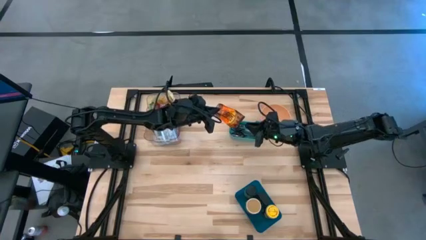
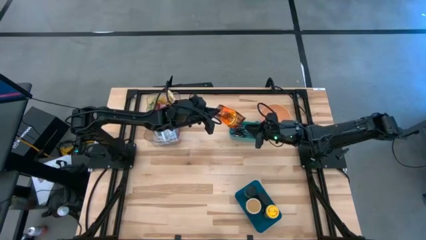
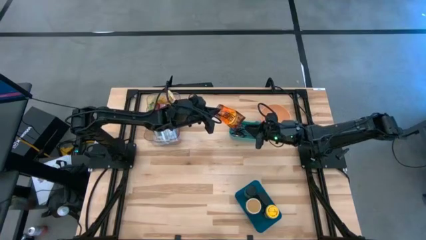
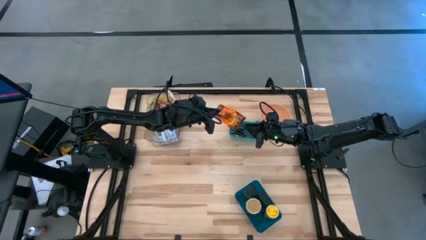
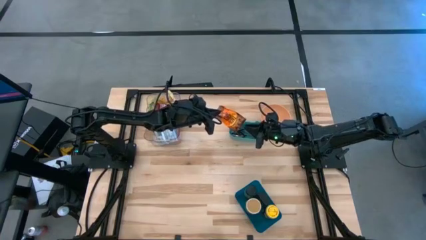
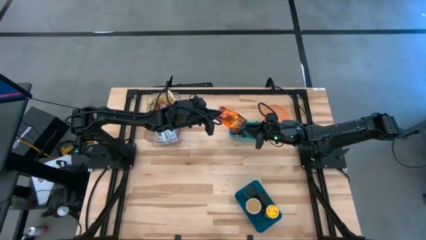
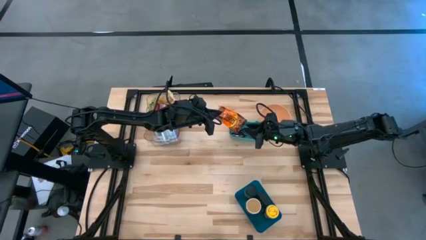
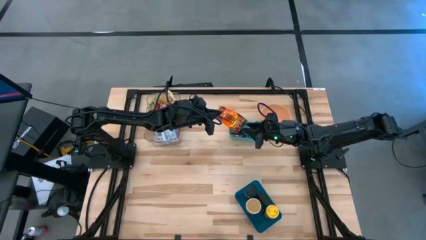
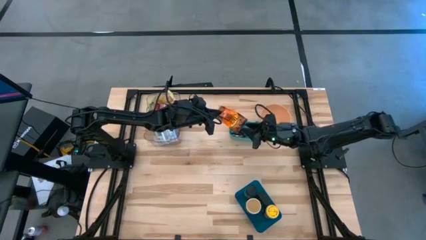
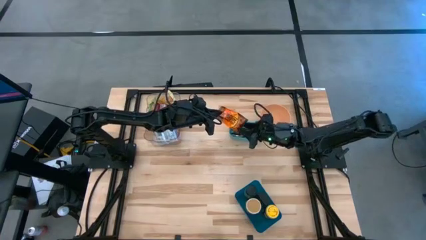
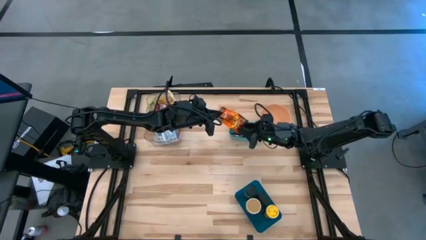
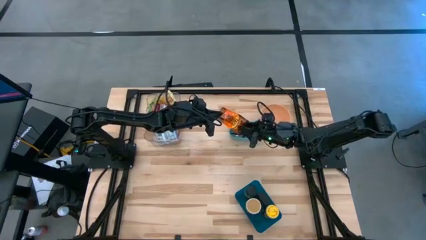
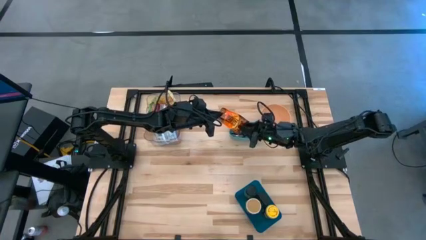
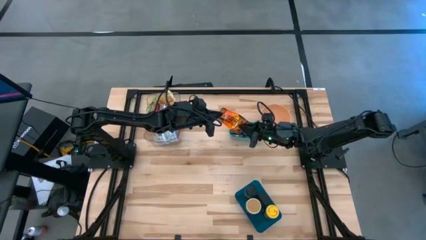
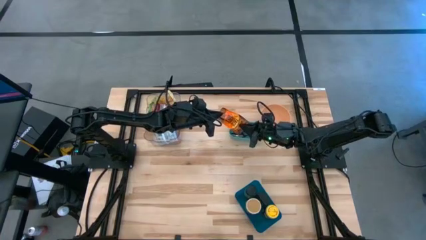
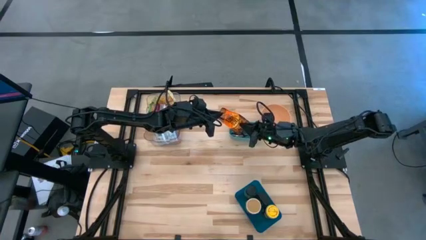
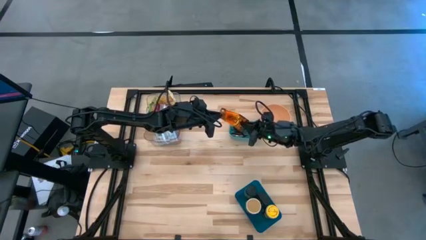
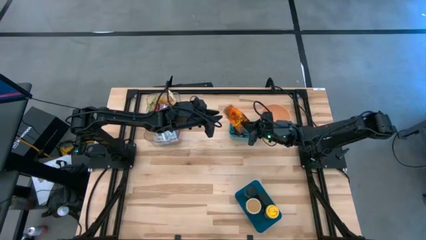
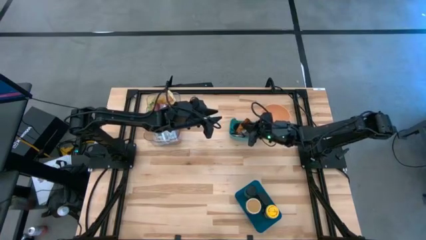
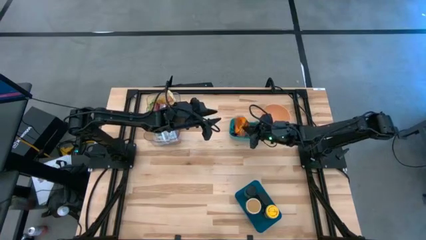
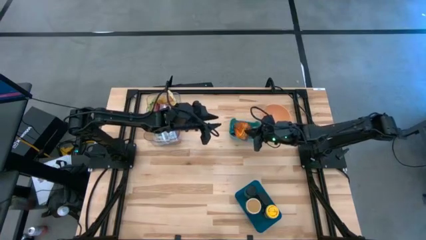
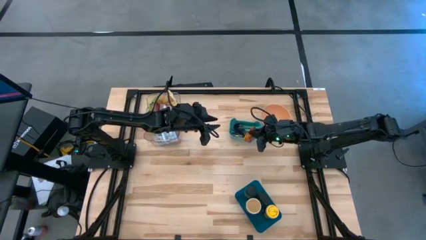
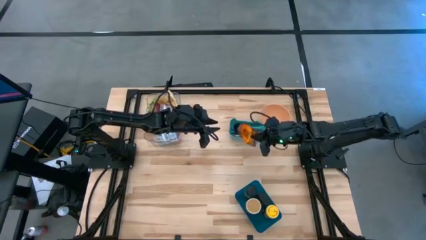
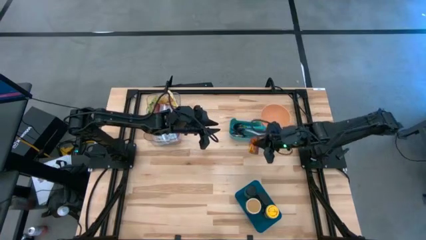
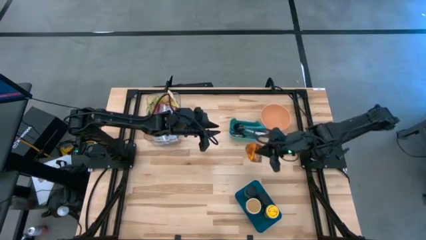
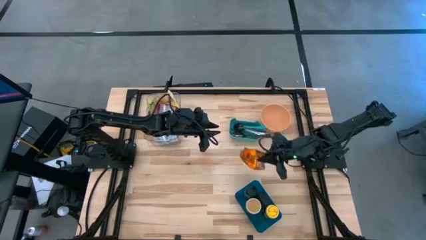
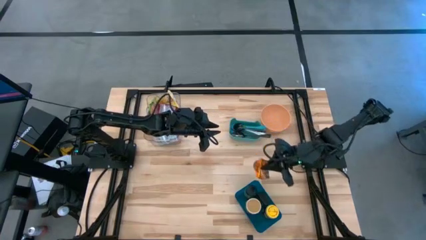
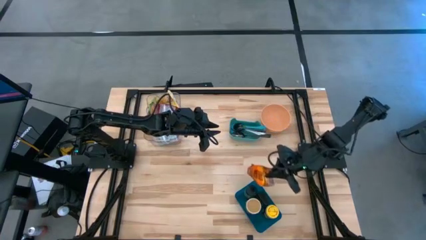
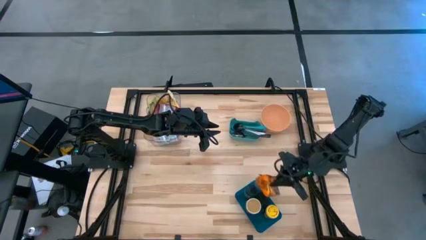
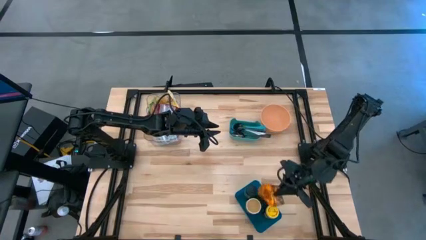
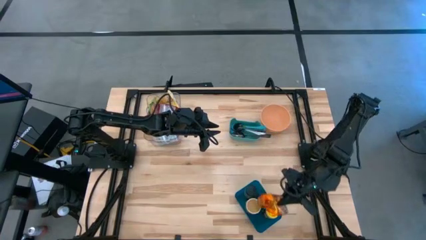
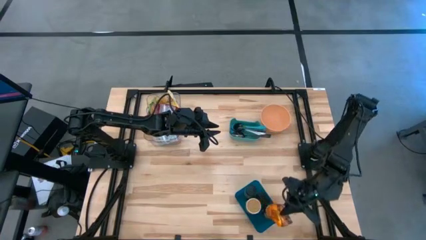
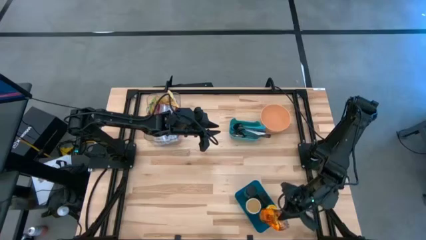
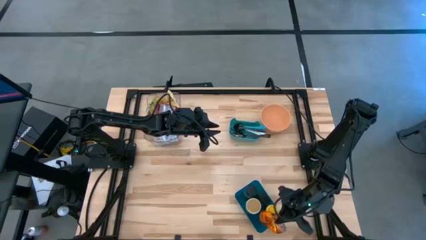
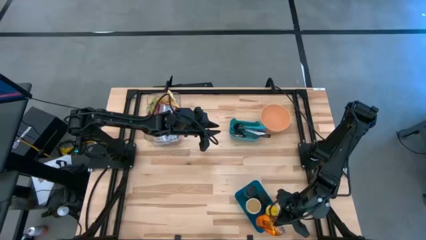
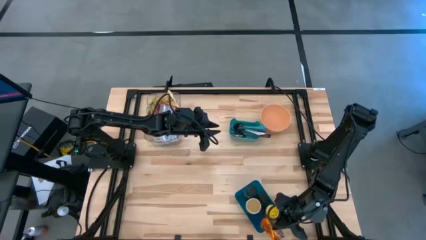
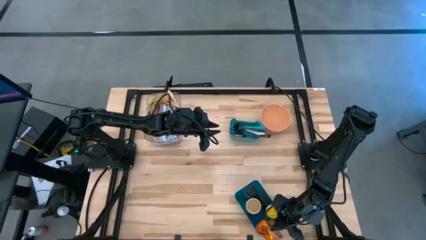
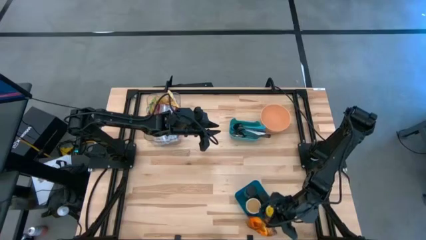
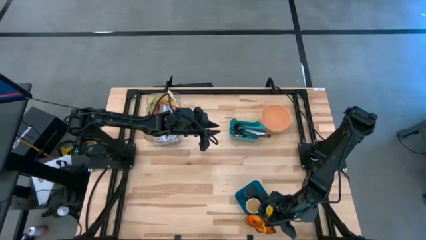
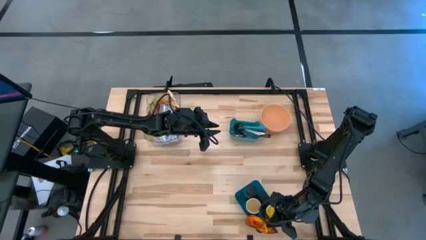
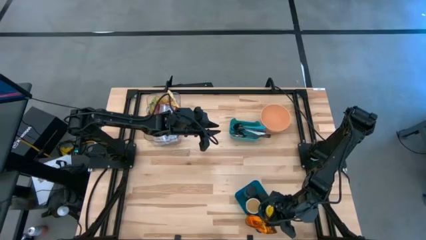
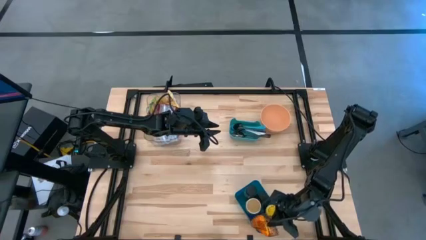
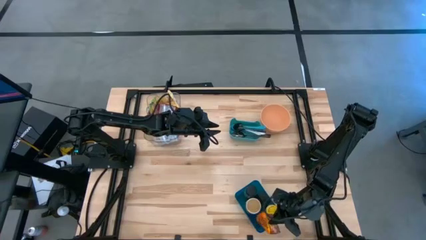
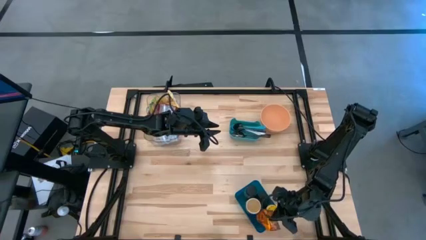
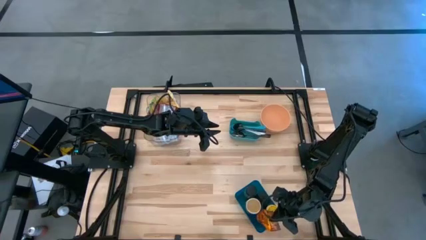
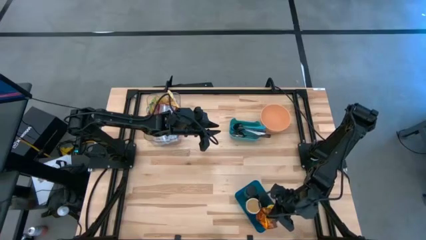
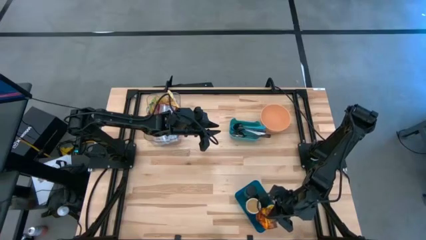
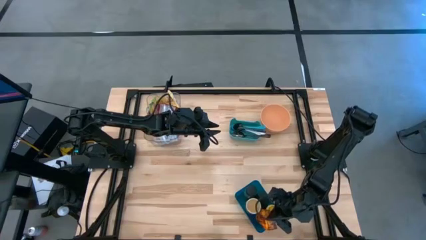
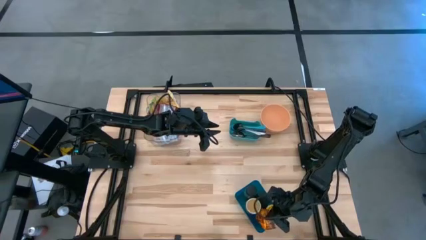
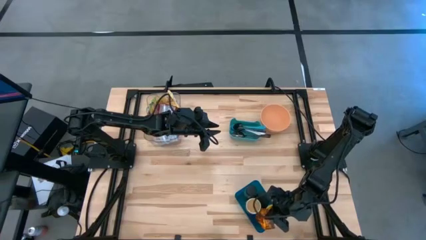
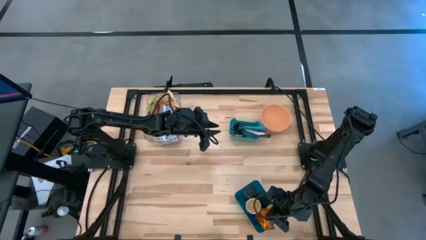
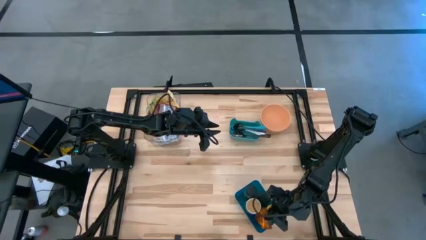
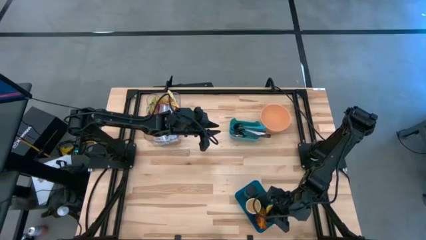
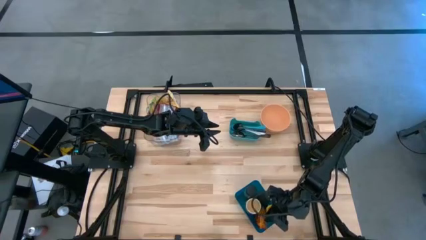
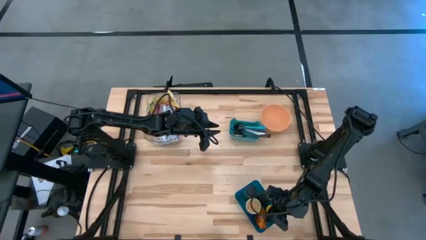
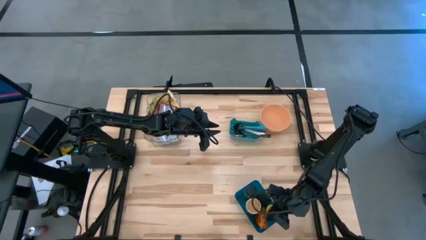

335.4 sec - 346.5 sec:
Task: Pick & Place Food Item
Put the orange seasoning pack into the blue bin

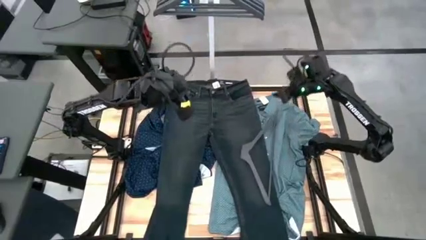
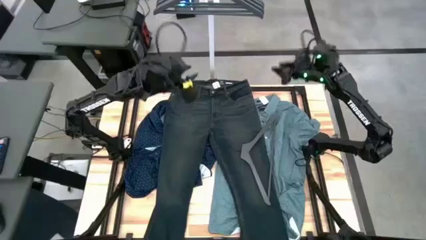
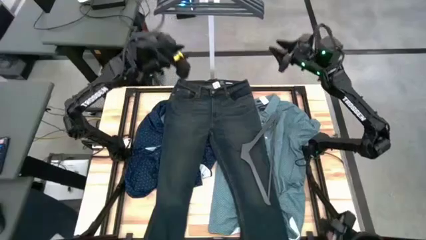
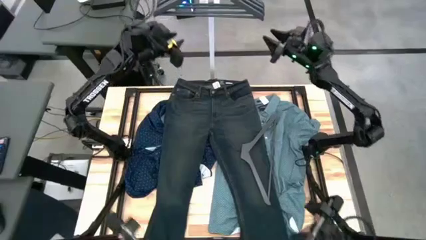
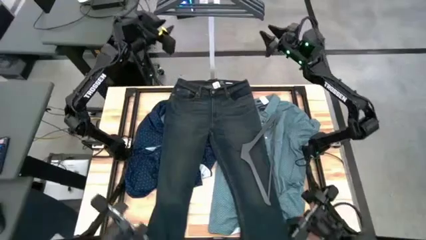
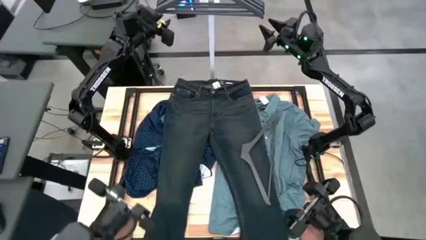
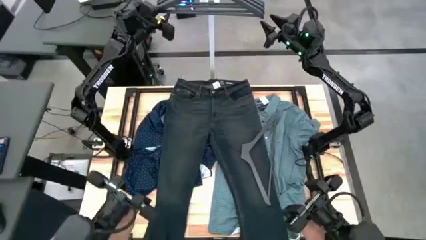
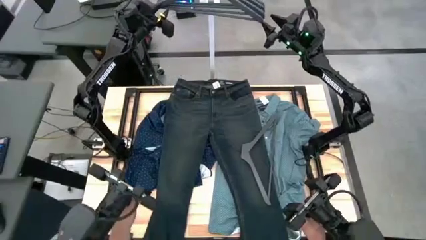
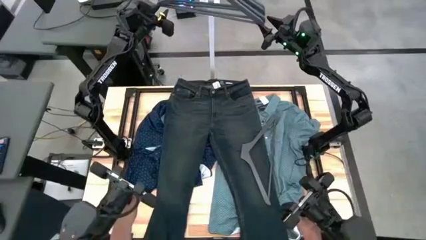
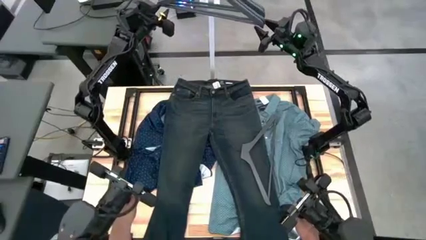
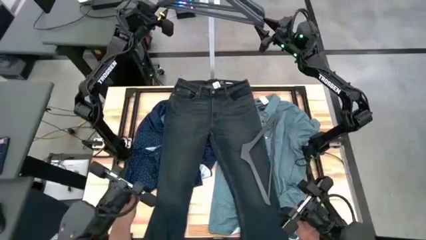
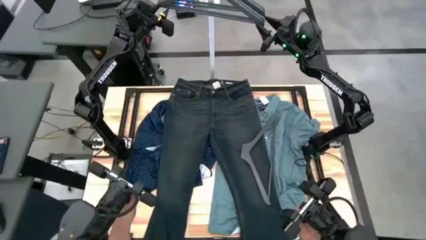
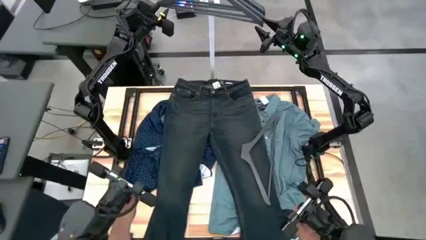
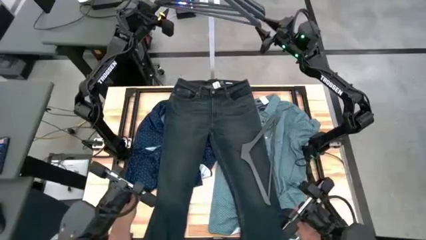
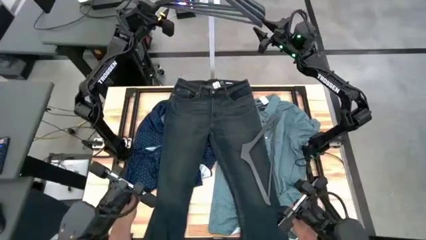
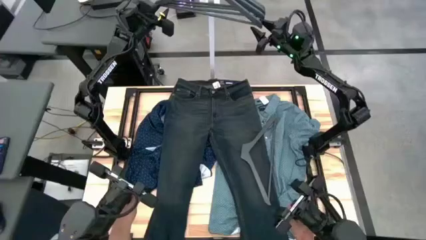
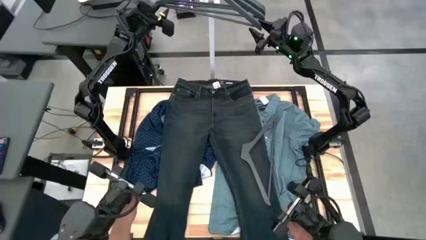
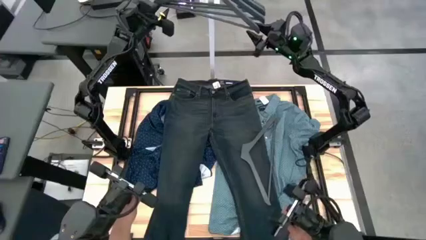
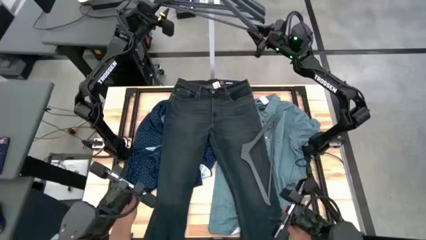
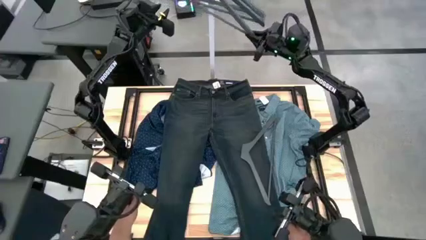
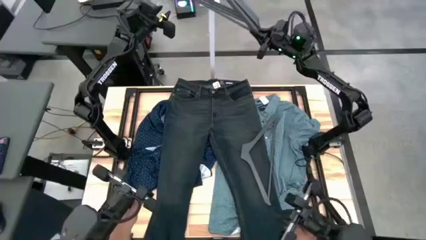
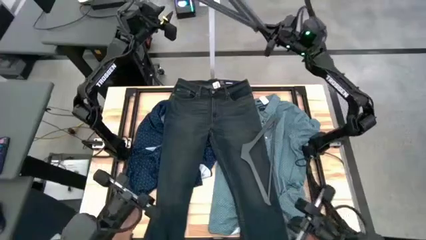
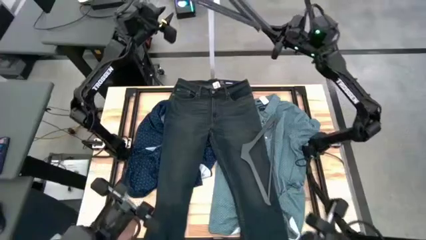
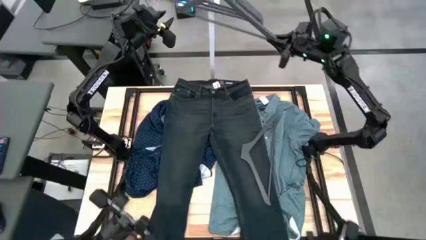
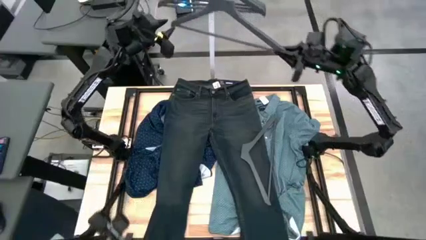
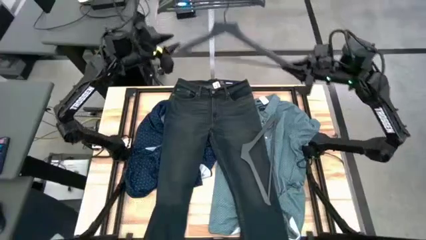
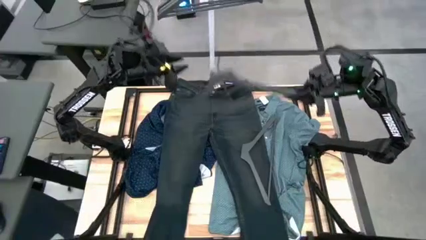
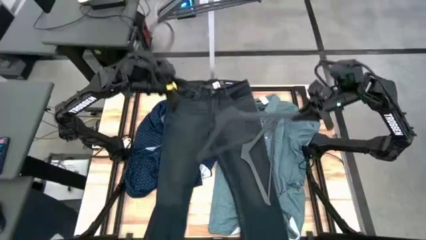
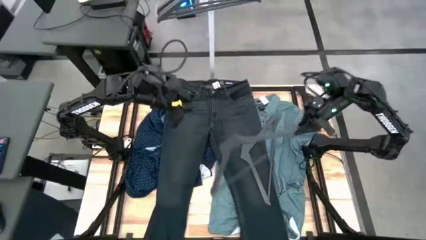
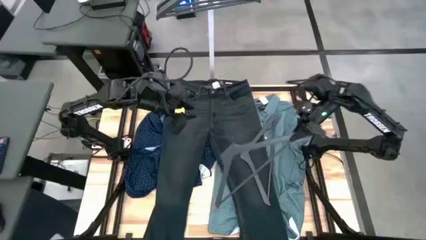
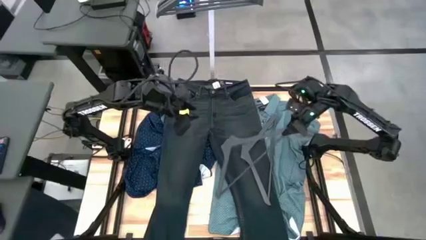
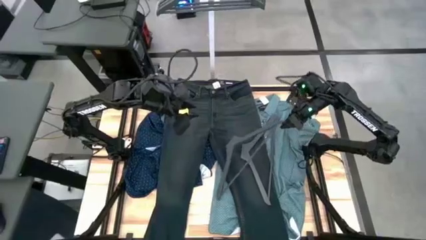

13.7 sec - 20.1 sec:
Task: Hang clothes
Remove the gray hanger from the rack
